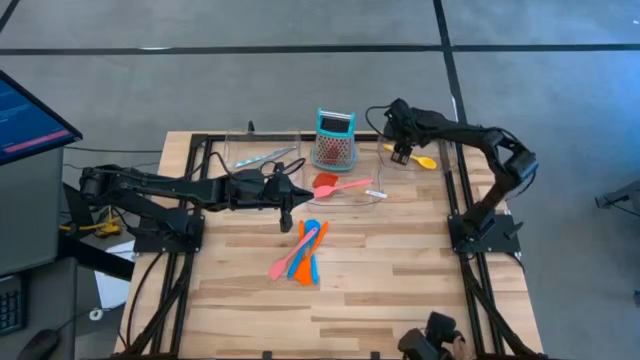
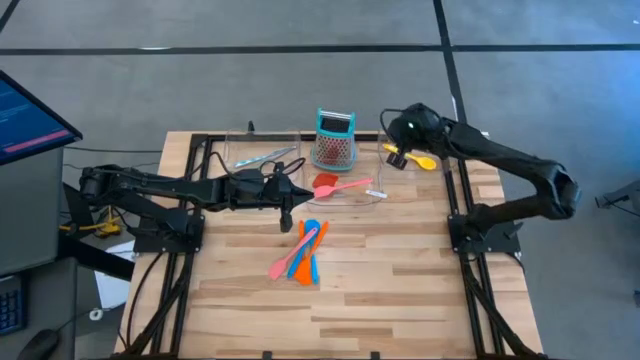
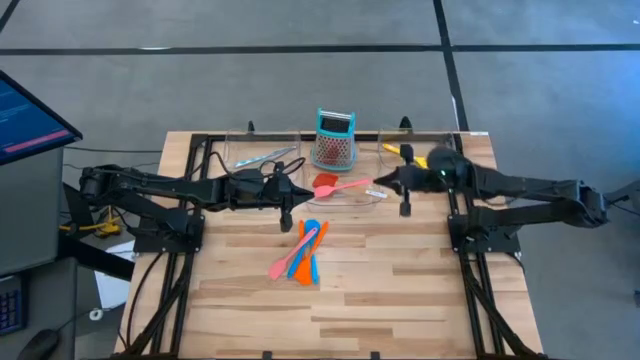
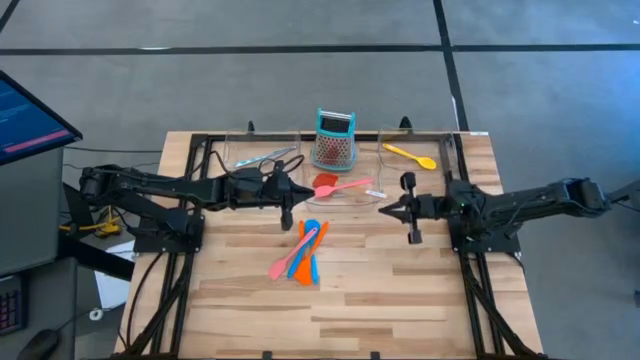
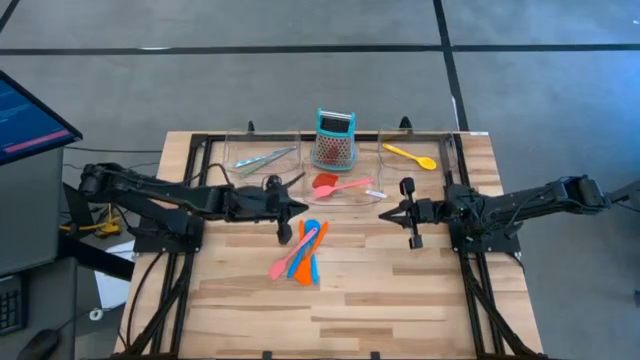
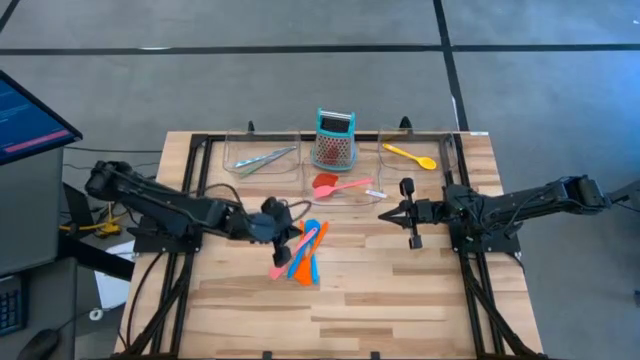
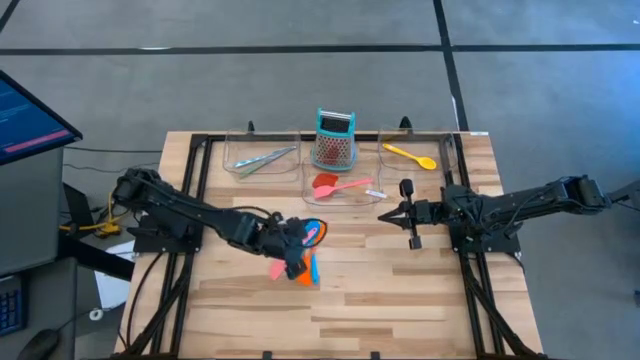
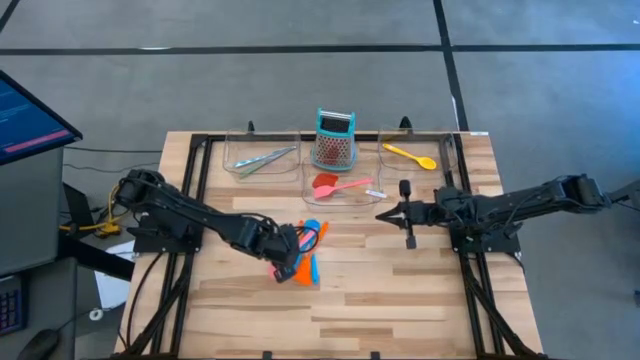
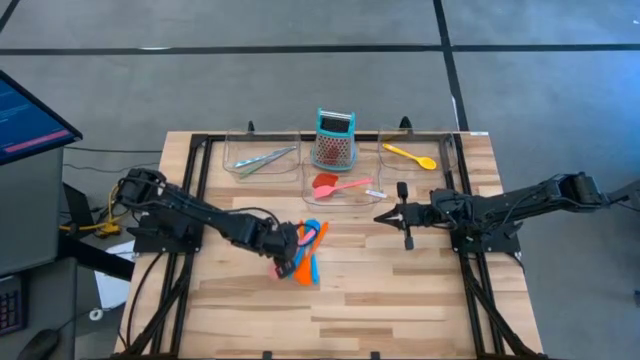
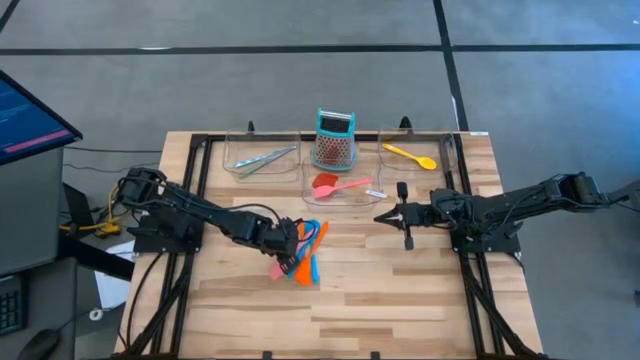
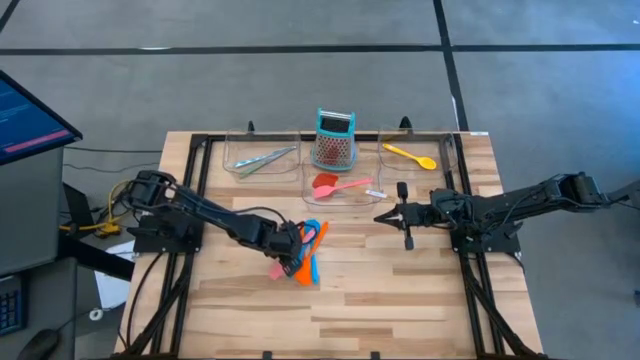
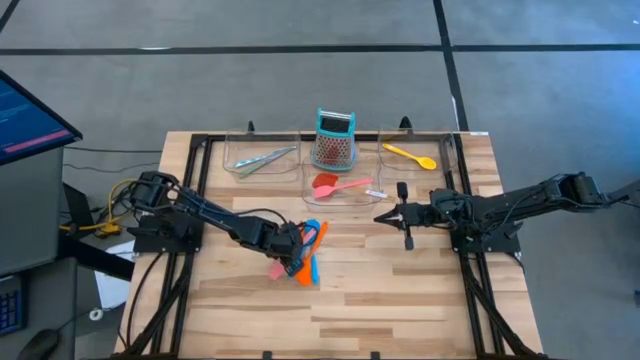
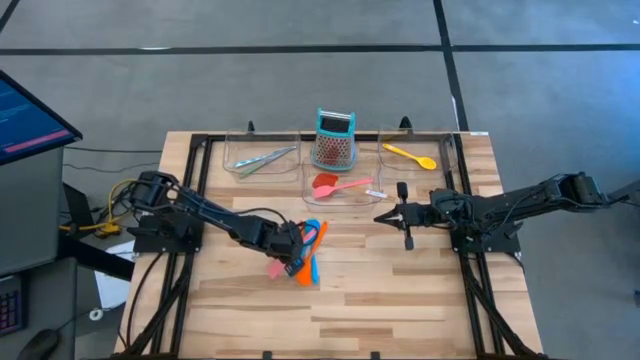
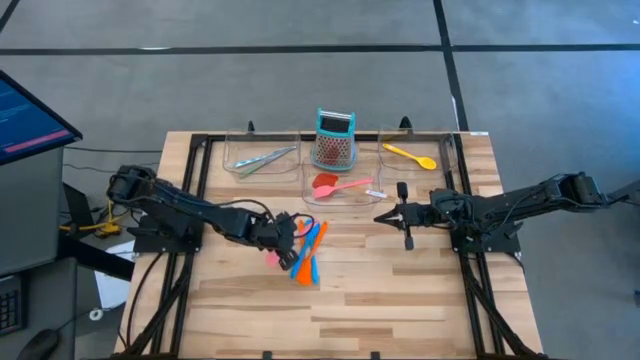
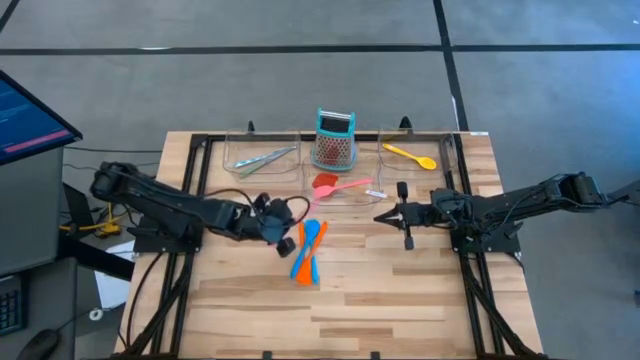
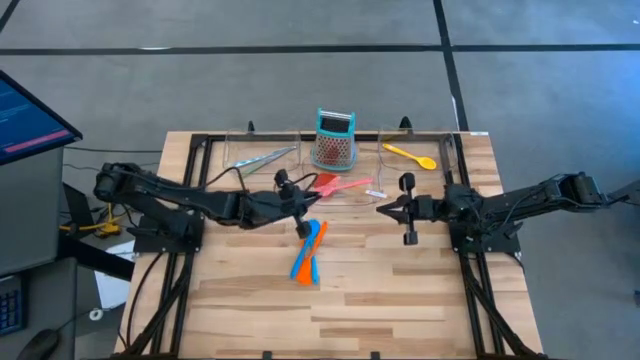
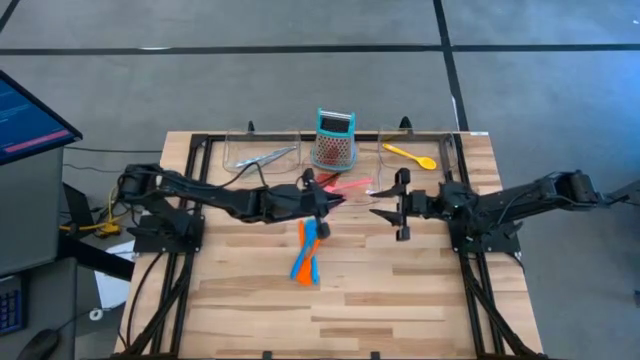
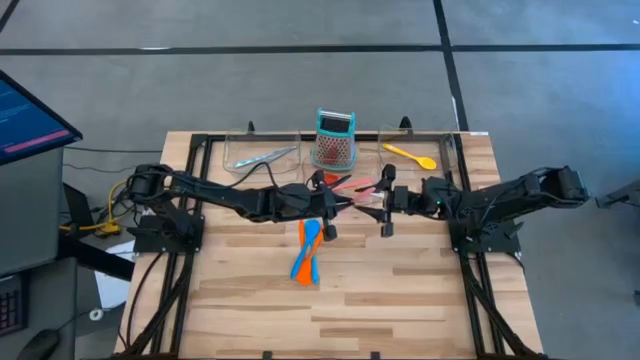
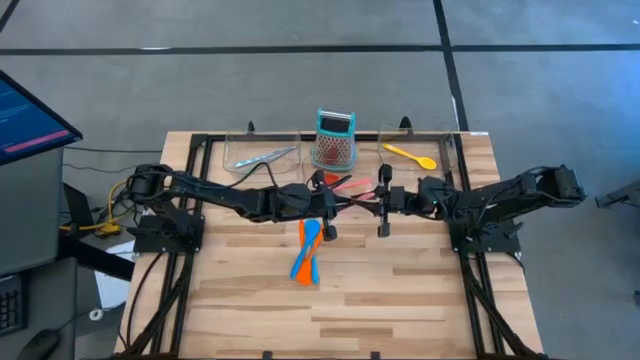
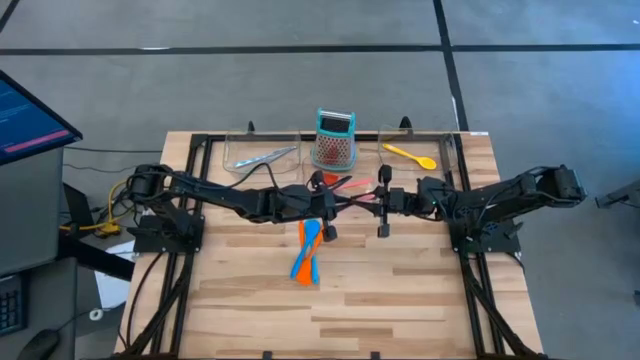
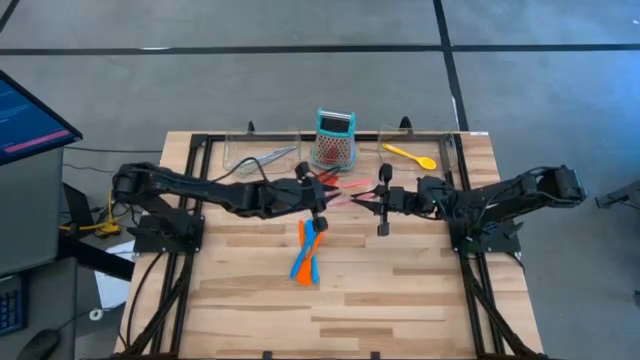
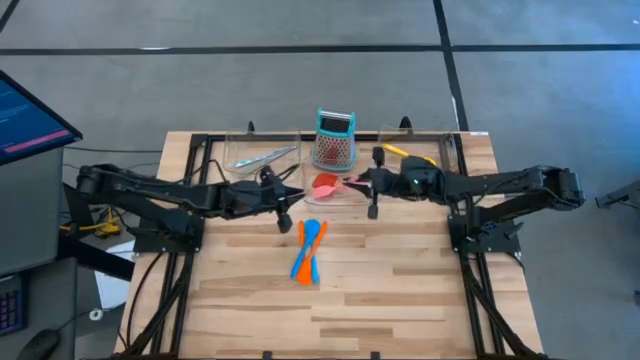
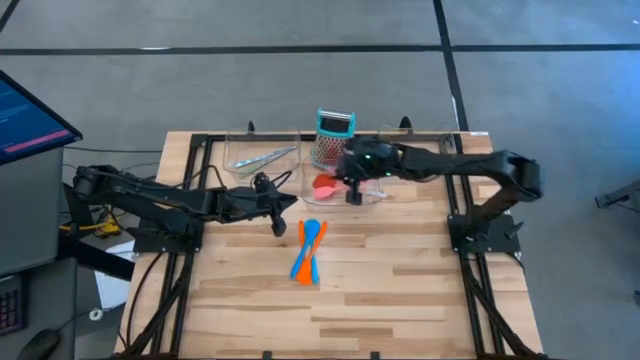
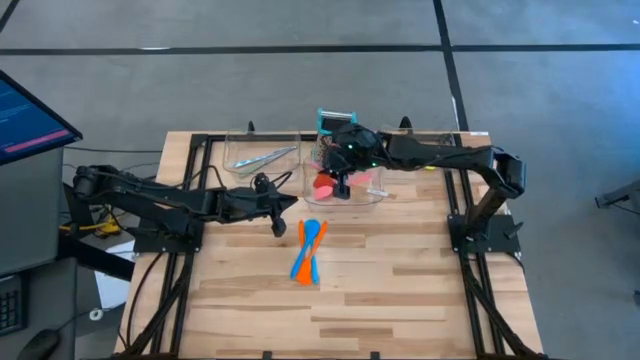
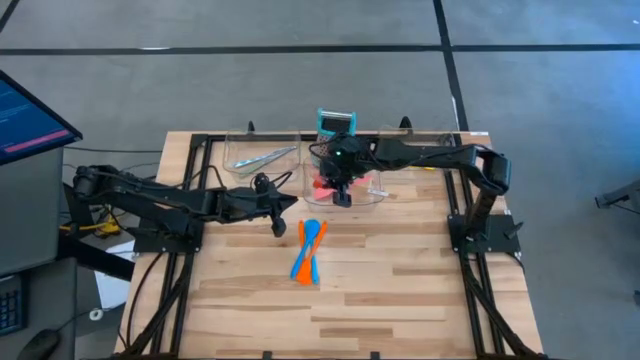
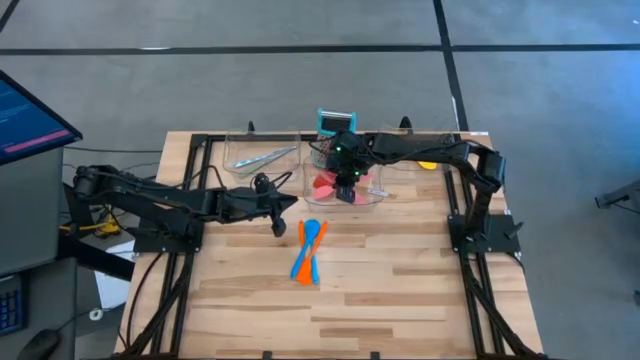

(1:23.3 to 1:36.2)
Task: Pick & Place Kitchen Items
Put the pink spatula into the middle transparent bin

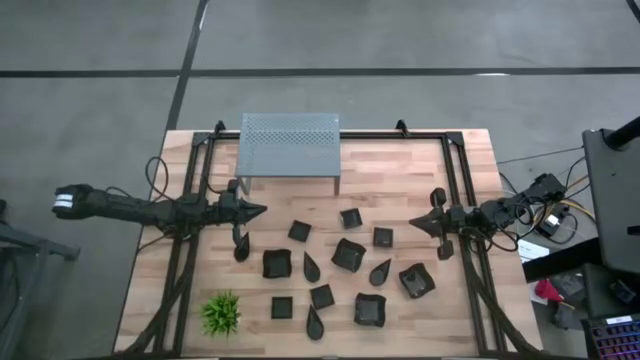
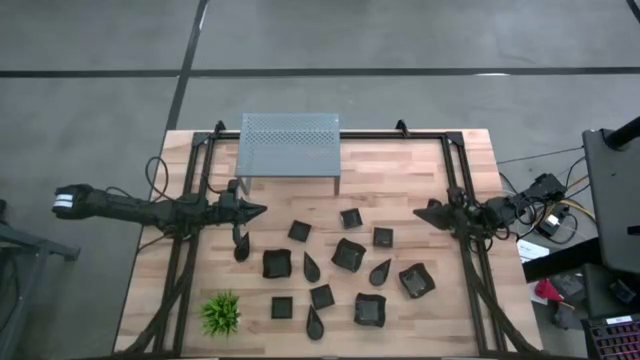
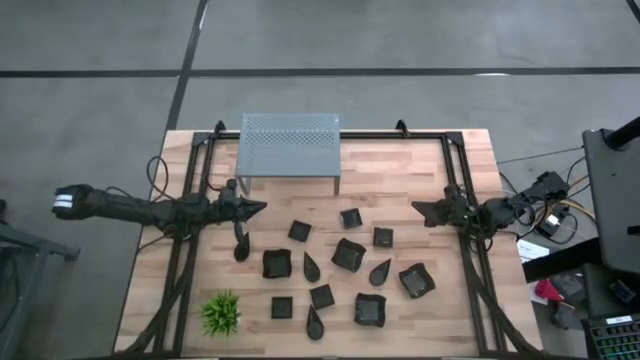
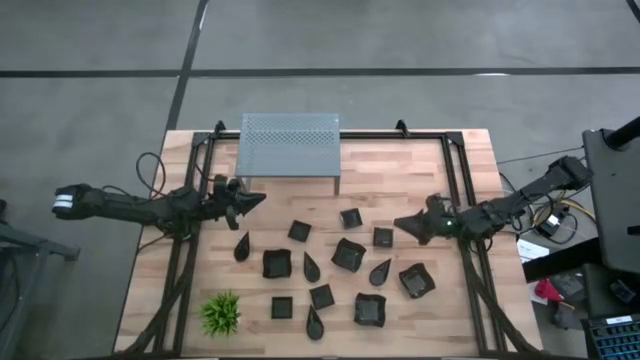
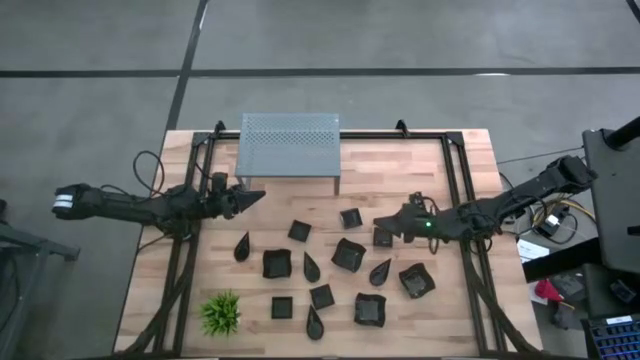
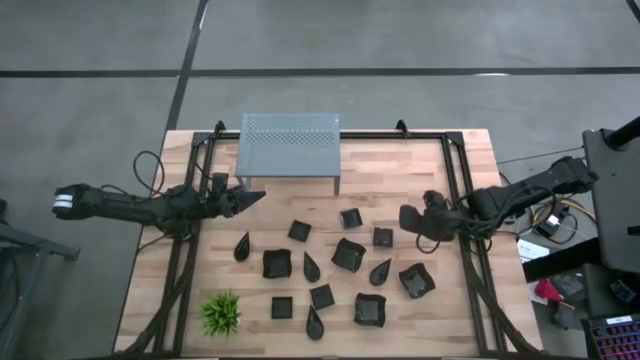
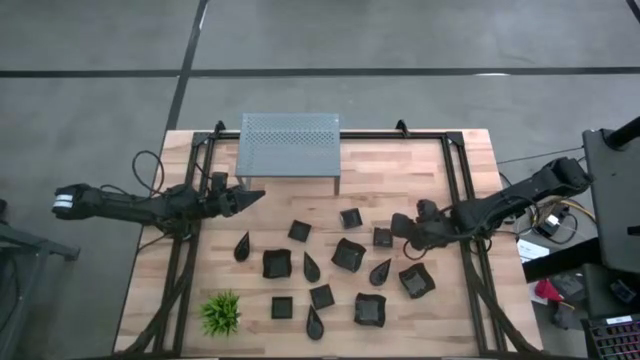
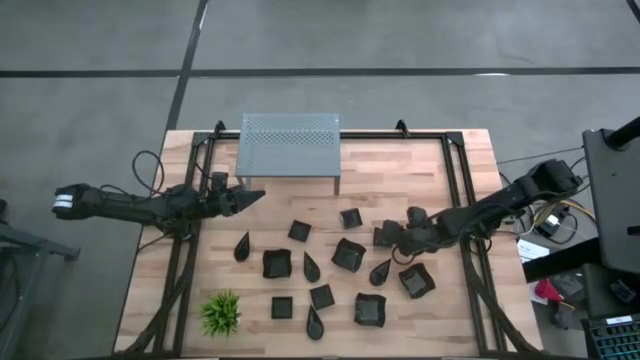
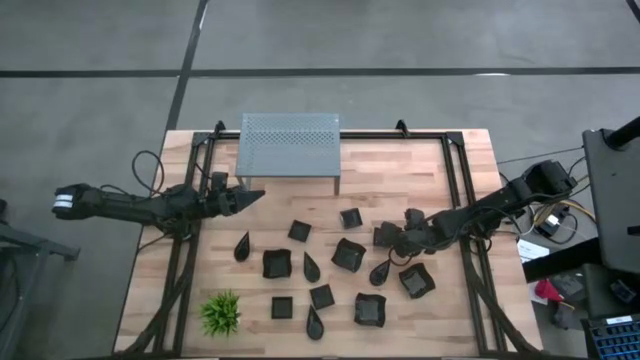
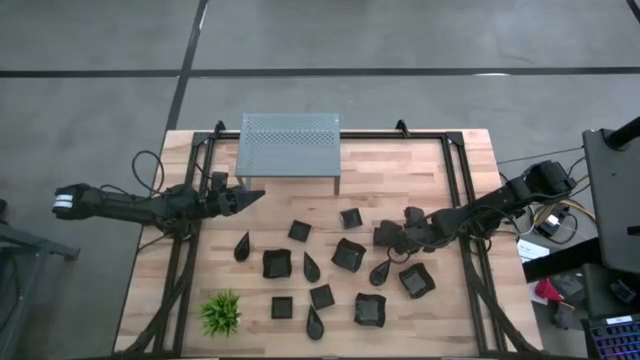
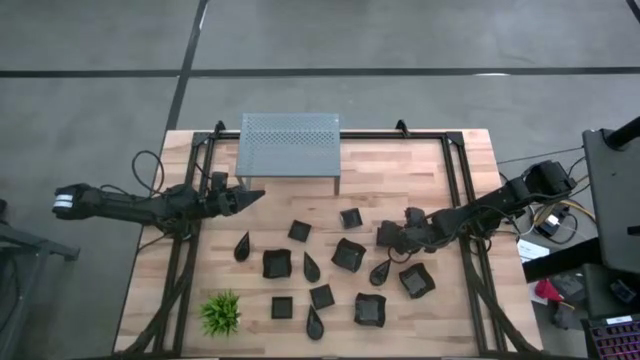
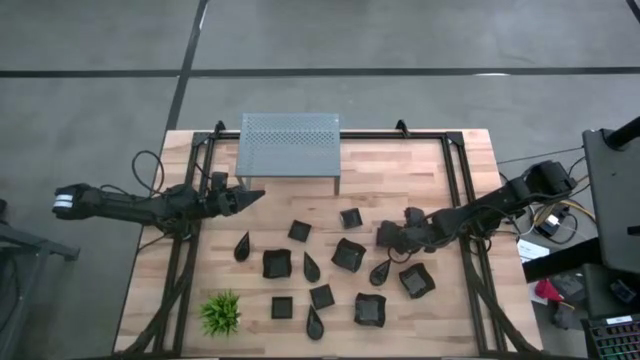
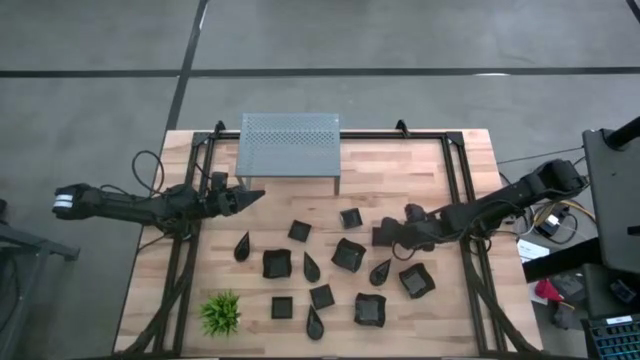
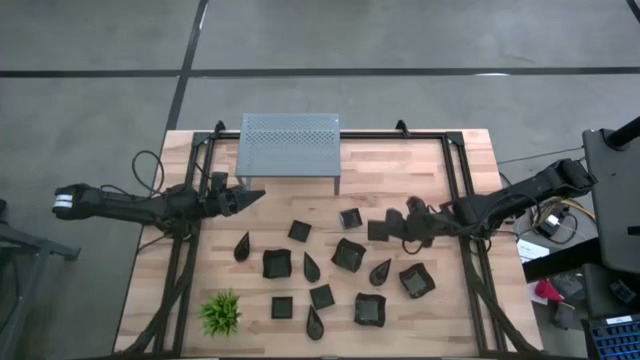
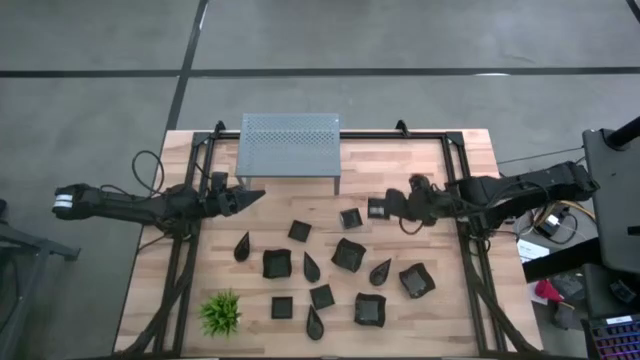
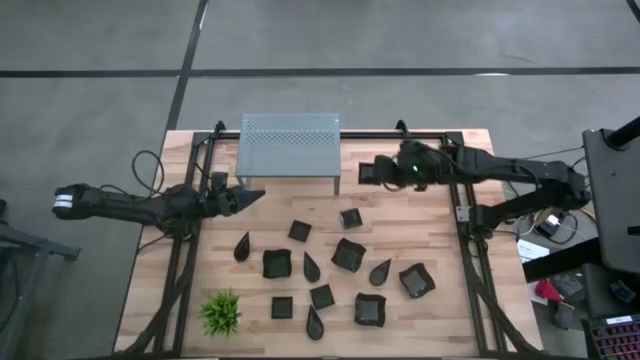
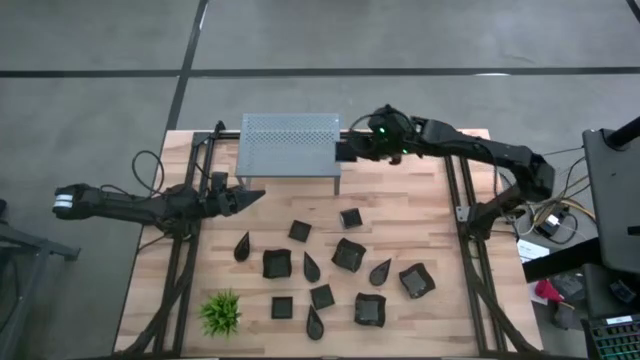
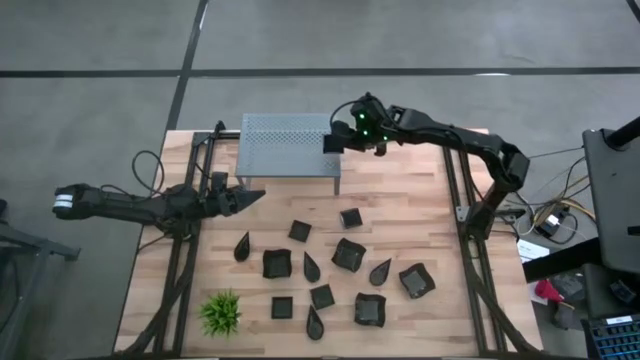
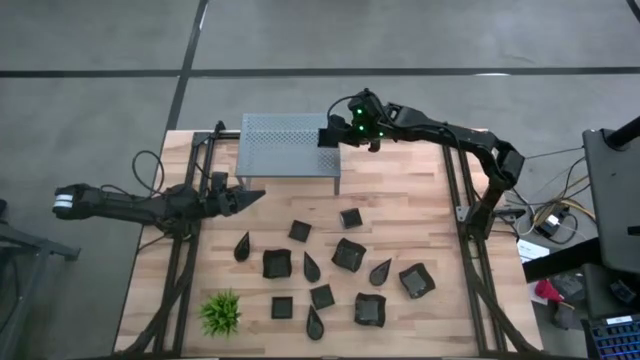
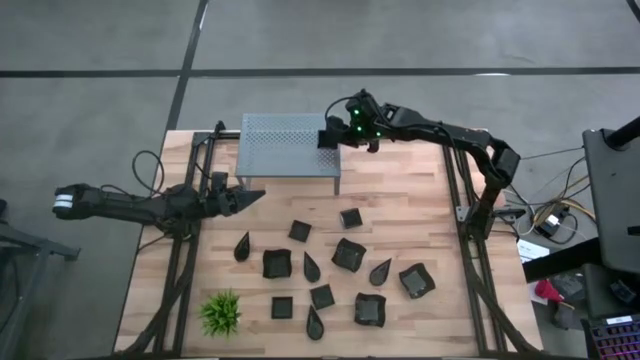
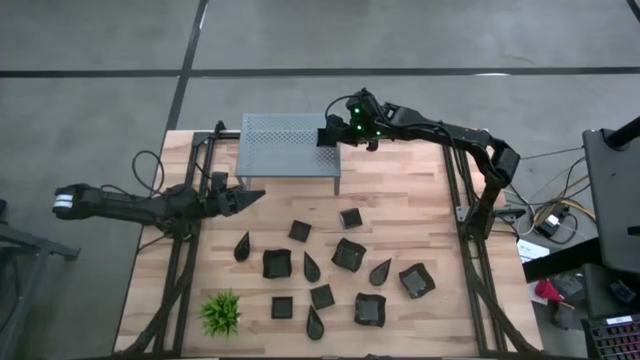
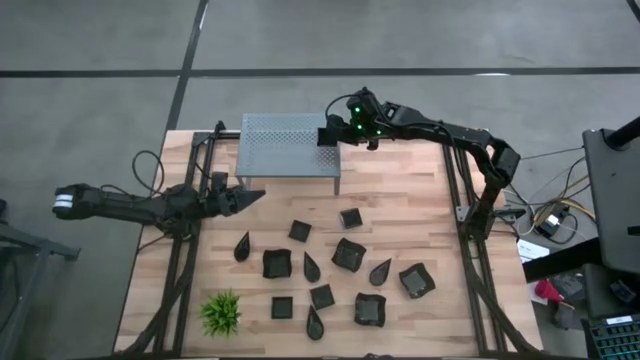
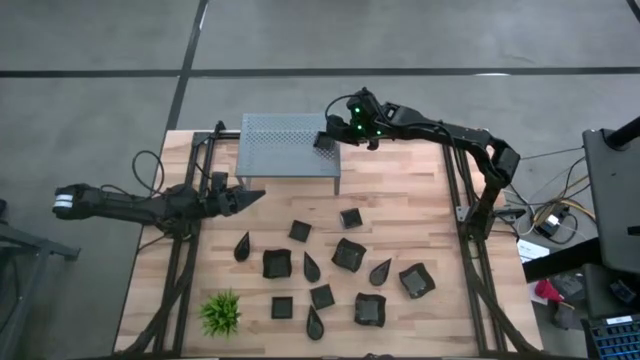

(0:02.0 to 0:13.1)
Task: Pick & Place Mini shaped plates
Put the square plate on the right shelf
